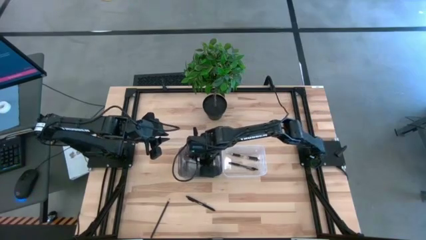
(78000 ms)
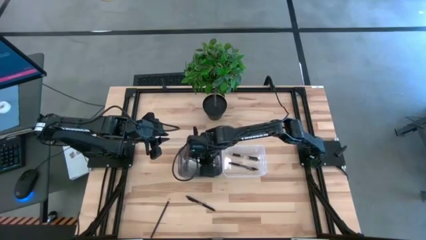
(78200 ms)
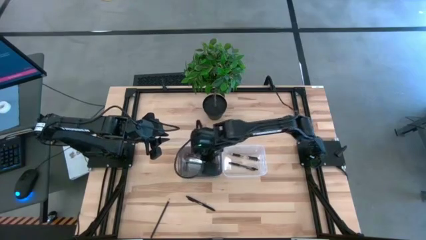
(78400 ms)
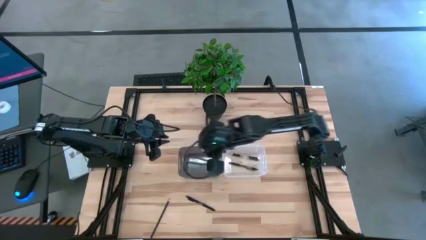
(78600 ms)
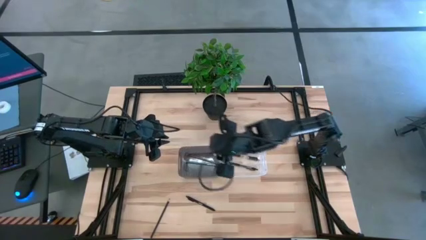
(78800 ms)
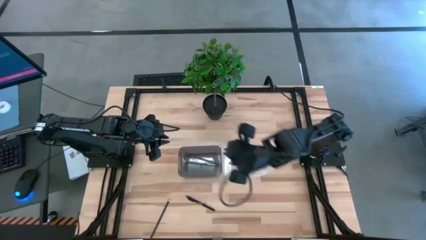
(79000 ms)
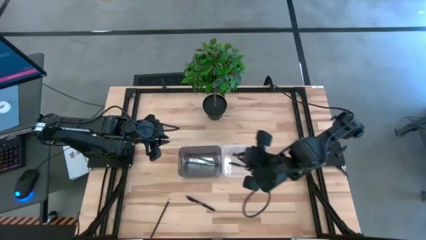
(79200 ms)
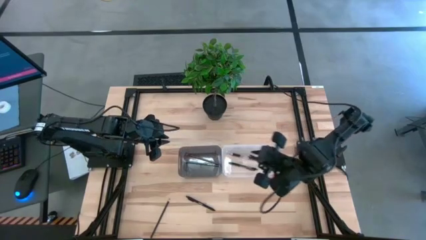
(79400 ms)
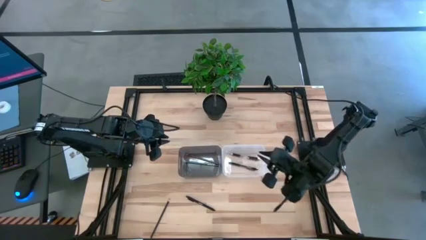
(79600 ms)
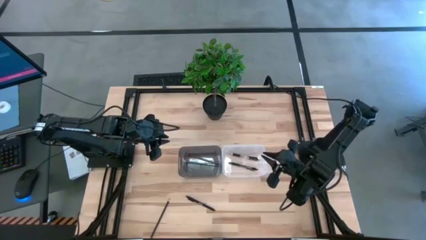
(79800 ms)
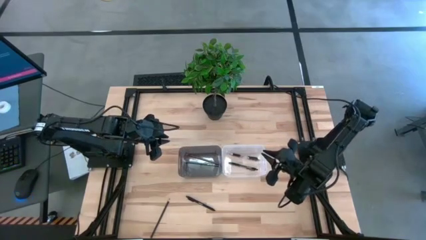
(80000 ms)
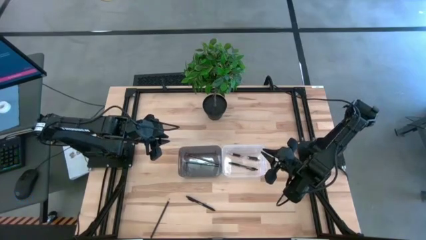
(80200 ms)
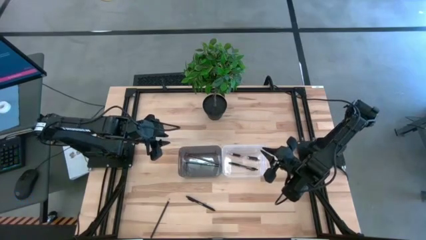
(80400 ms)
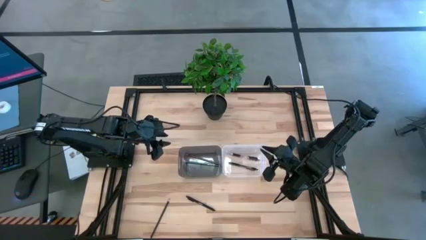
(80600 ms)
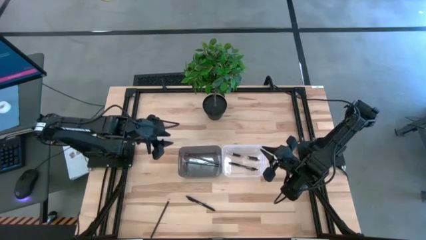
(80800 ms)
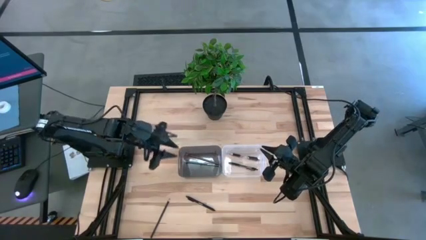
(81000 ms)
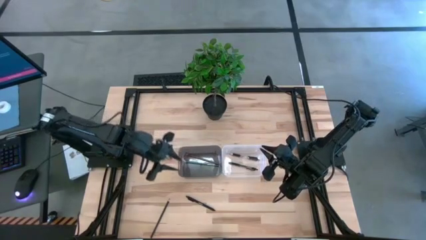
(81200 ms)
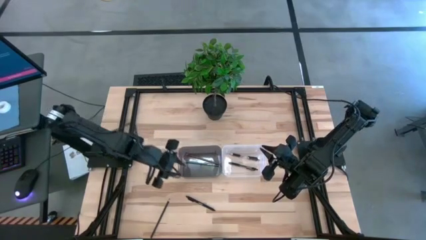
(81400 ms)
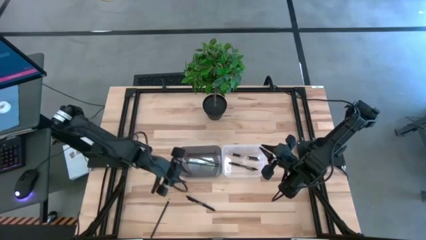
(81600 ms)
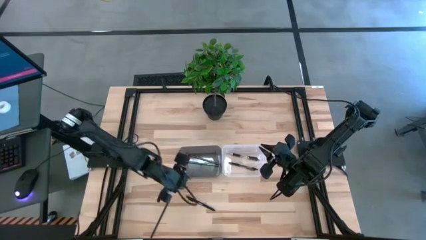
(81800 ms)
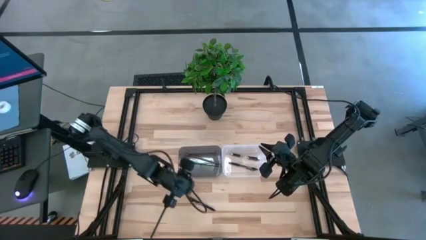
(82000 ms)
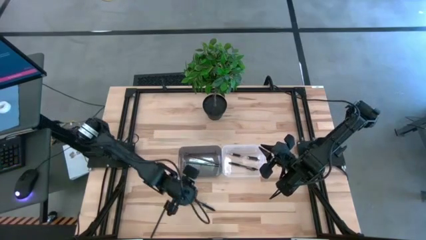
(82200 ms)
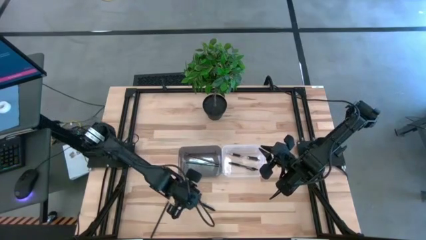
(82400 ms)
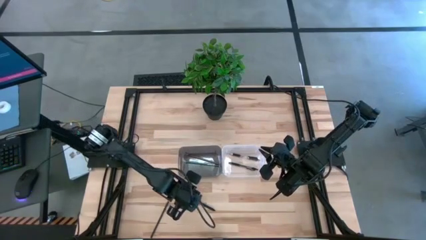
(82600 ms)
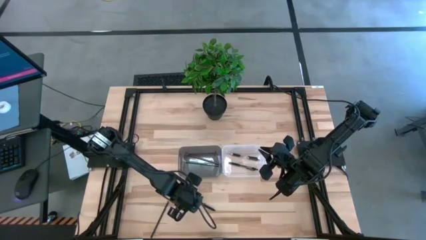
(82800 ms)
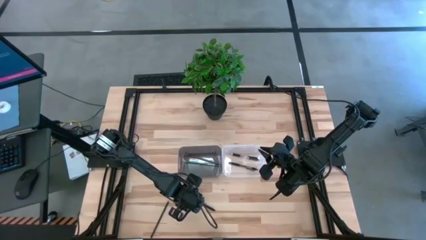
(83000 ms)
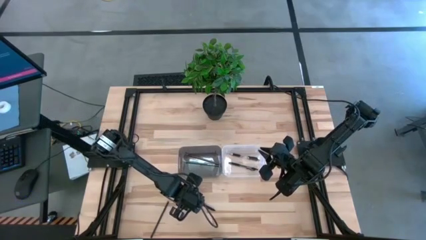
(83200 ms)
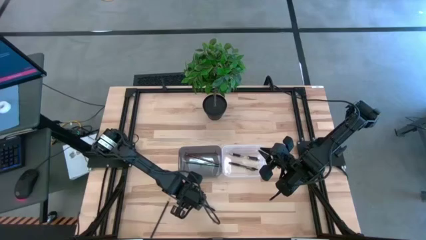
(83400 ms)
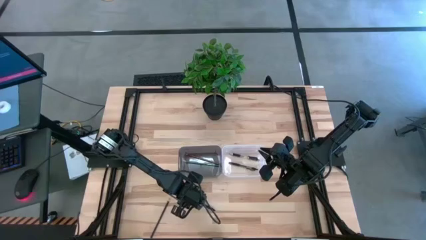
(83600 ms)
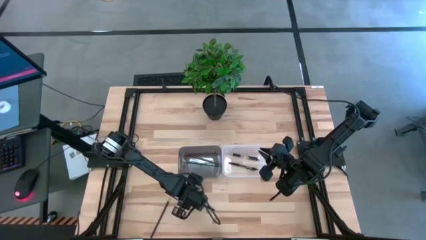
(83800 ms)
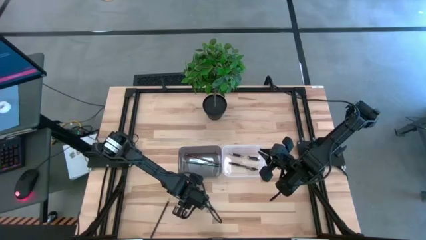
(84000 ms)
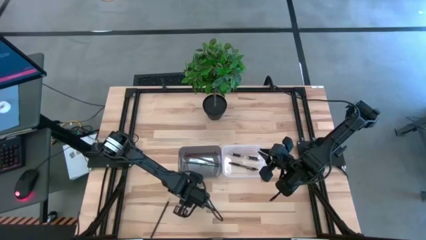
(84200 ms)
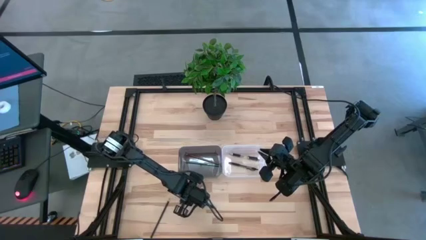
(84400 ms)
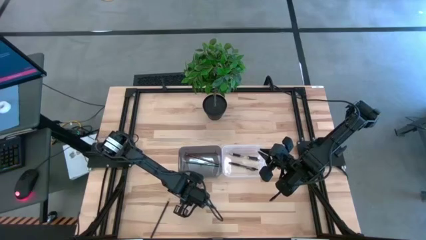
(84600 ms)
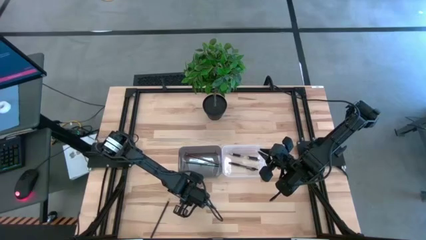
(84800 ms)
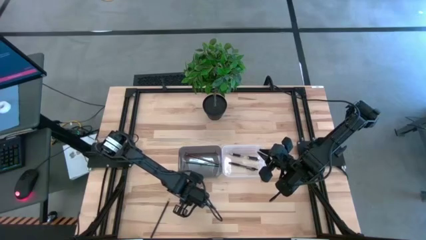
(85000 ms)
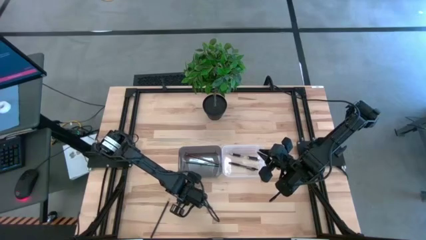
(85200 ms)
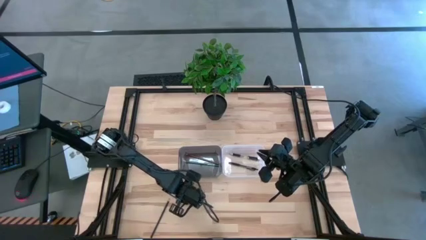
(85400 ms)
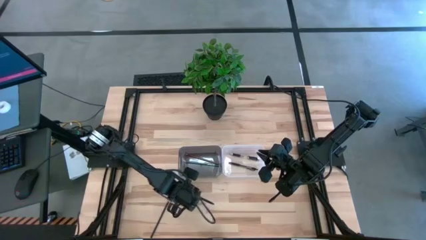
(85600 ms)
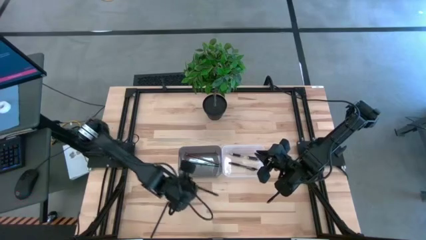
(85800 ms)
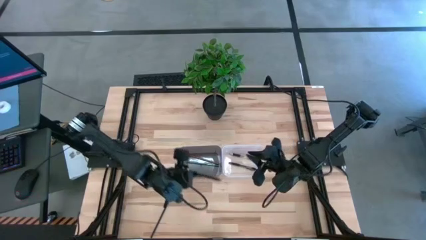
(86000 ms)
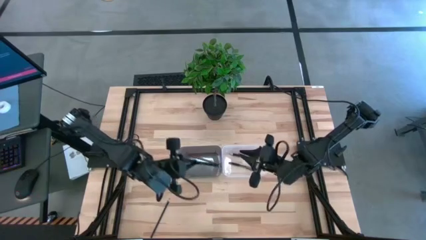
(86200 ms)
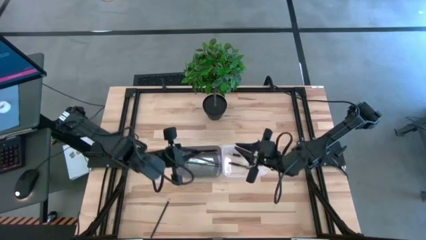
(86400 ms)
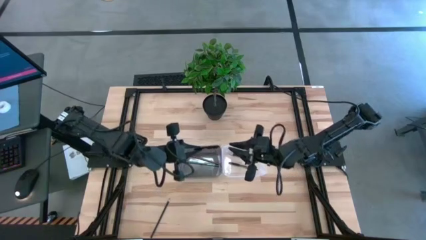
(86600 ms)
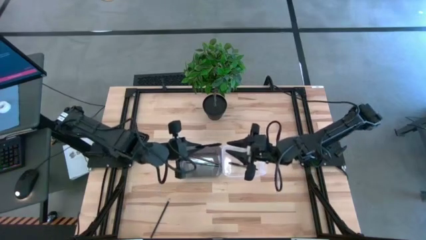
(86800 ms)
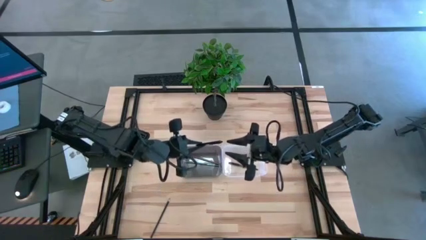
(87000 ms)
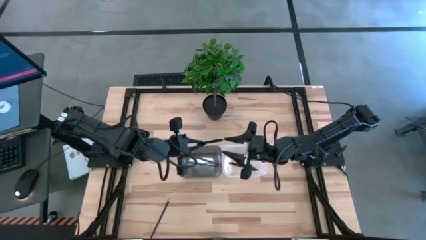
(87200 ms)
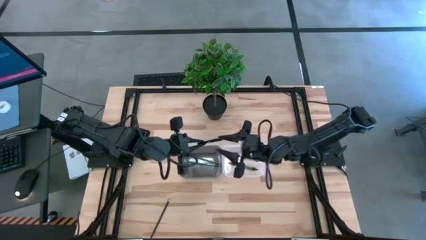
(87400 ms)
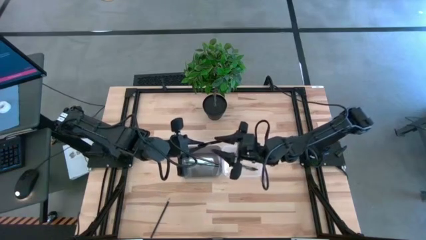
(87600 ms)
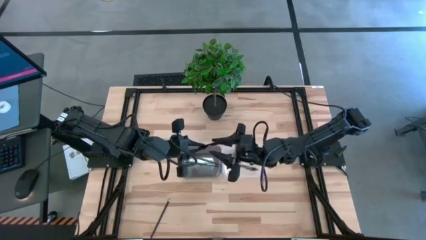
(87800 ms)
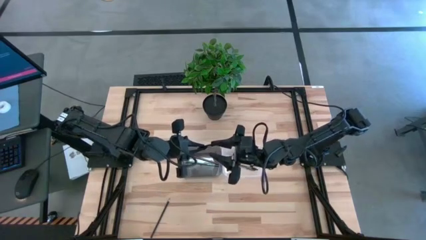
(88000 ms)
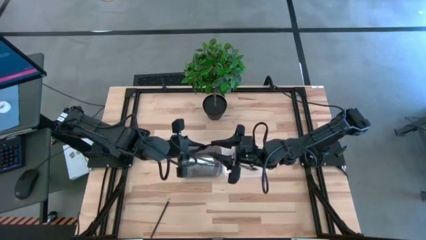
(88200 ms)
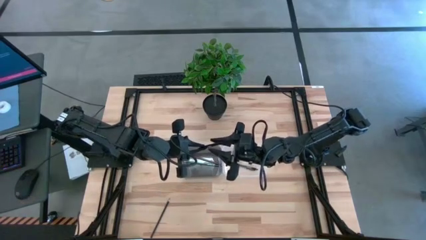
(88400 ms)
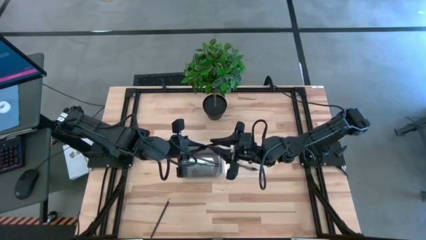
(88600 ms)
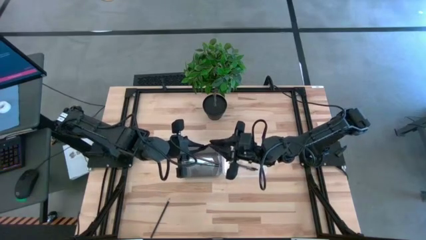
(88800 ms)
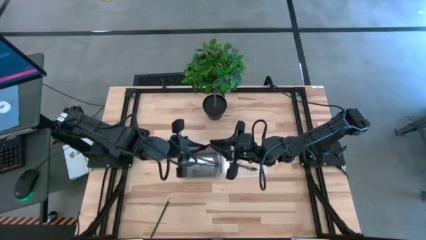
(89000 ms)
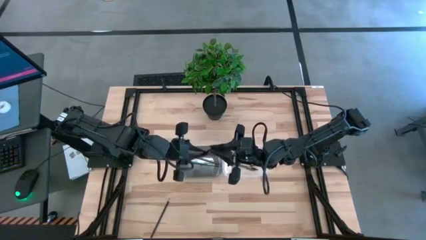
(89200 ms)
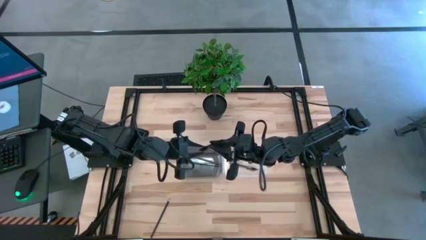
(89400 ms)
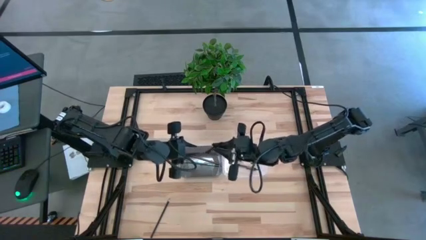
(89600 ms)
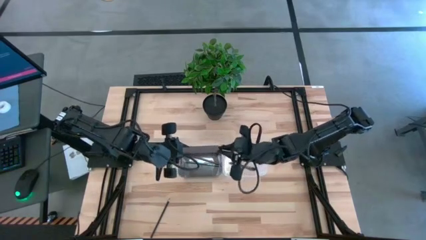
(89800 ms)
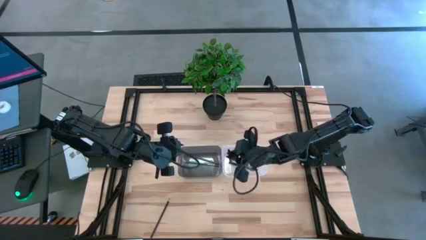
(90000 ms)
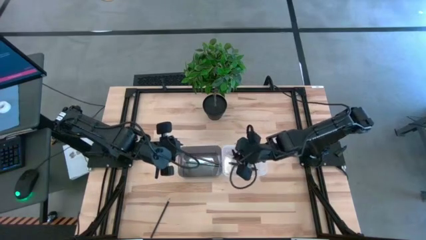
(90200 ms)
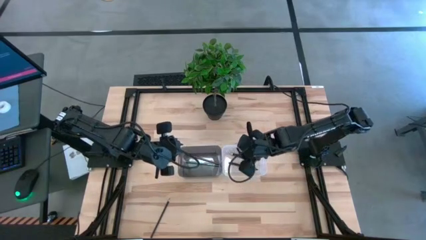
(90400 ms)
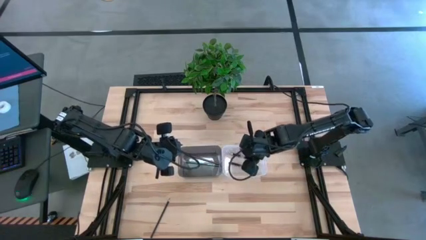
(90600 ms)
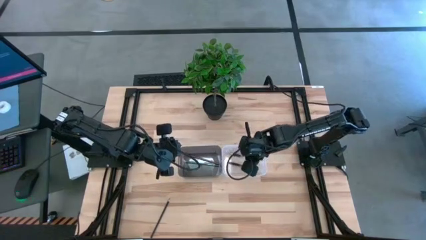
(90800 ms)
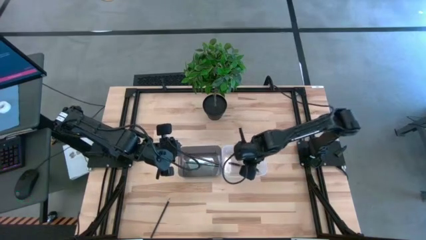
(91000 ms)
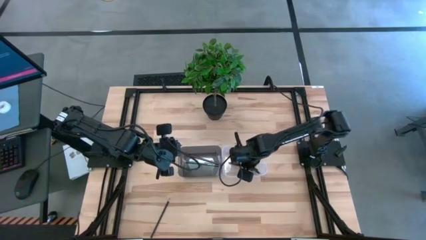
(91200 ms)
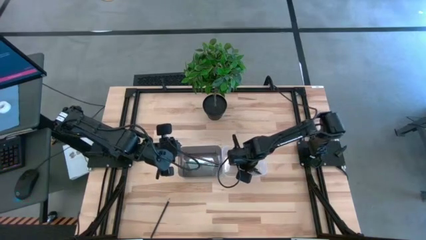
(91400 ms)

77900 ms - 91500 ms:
Task: Sort pens & pencils
Put the black pen into the transparent bin
